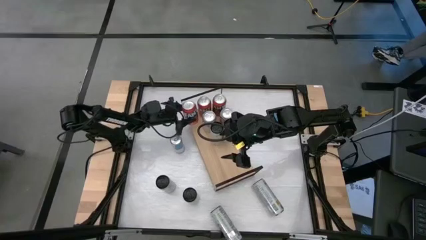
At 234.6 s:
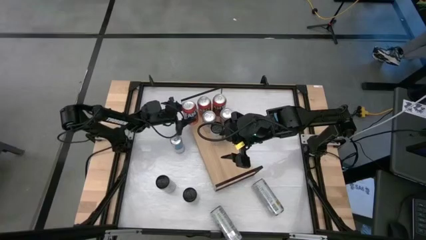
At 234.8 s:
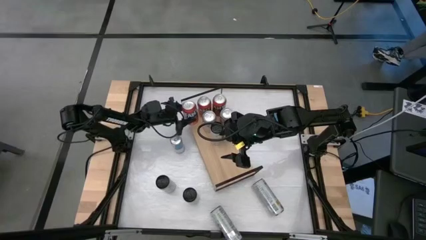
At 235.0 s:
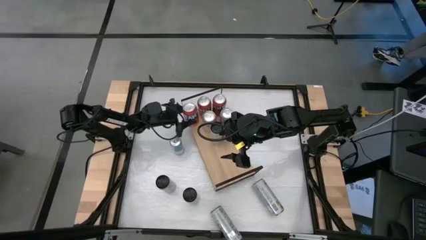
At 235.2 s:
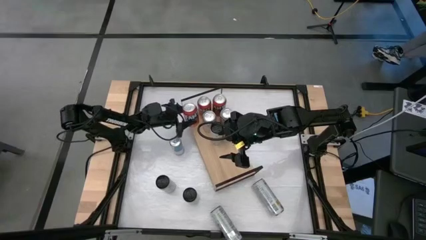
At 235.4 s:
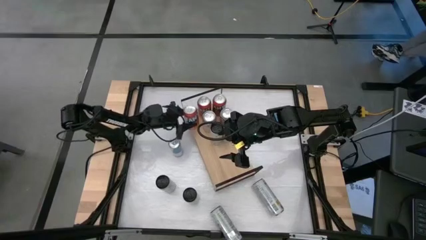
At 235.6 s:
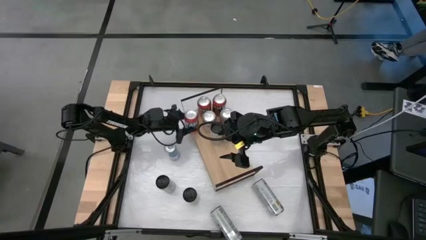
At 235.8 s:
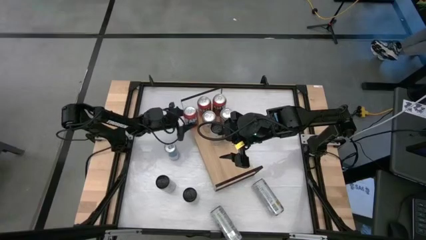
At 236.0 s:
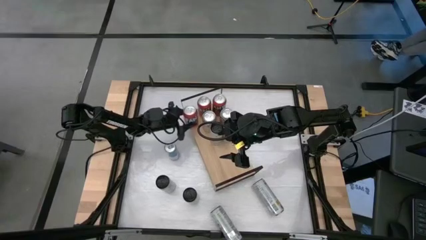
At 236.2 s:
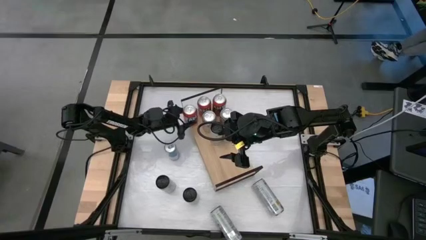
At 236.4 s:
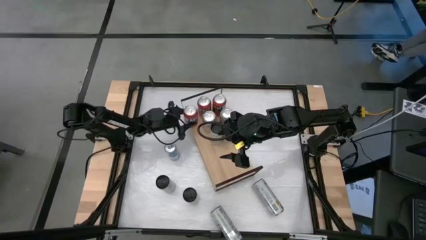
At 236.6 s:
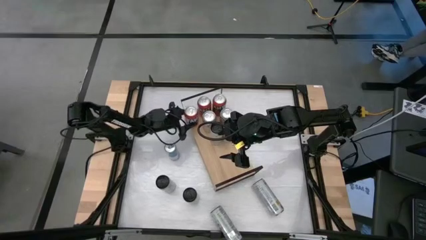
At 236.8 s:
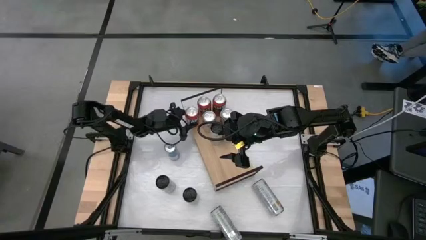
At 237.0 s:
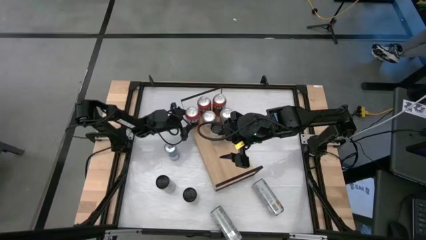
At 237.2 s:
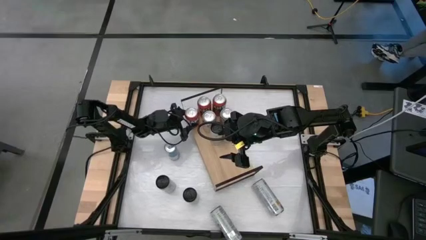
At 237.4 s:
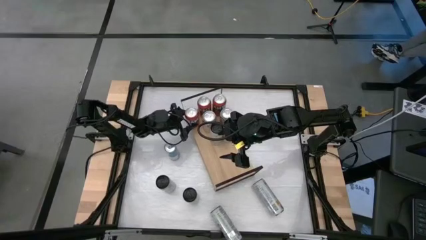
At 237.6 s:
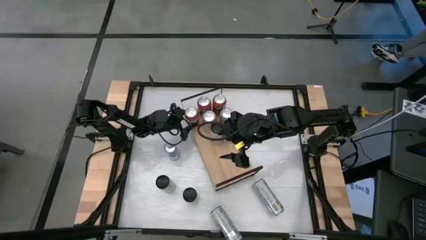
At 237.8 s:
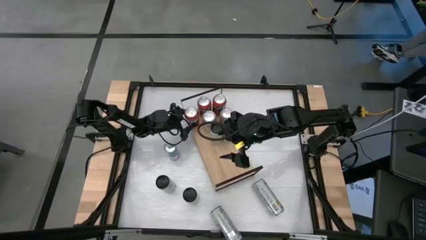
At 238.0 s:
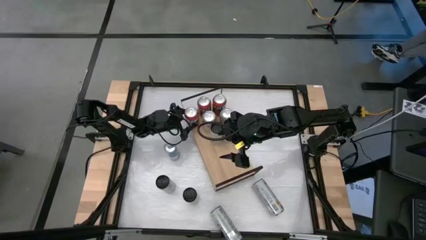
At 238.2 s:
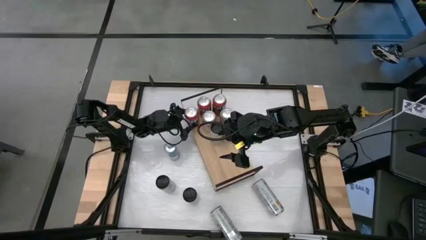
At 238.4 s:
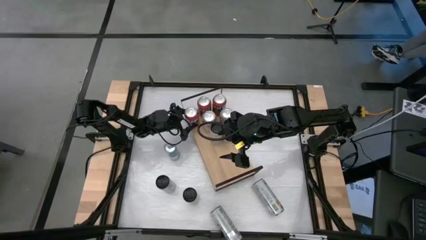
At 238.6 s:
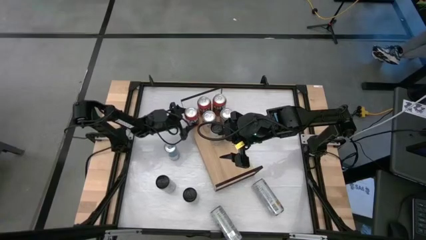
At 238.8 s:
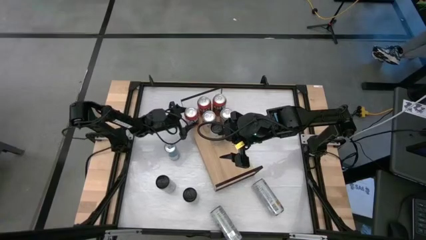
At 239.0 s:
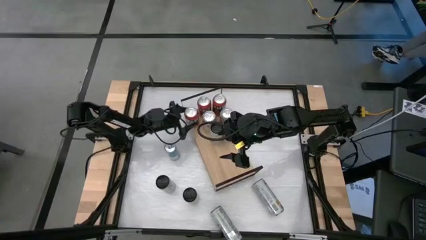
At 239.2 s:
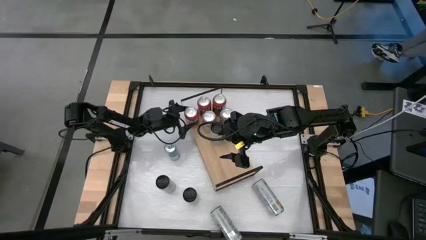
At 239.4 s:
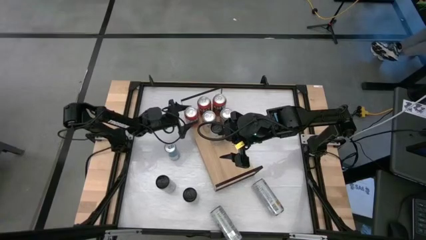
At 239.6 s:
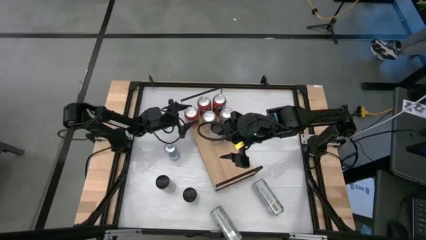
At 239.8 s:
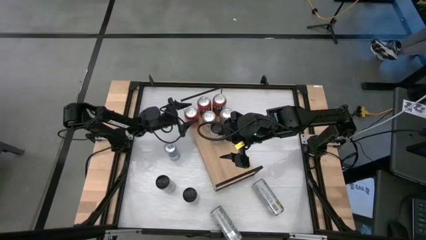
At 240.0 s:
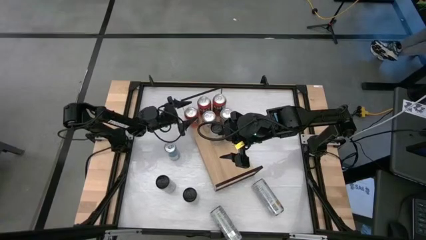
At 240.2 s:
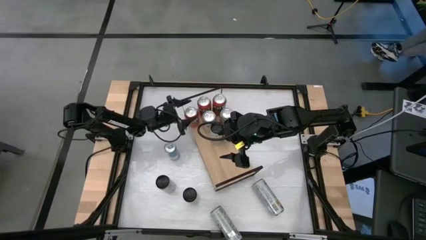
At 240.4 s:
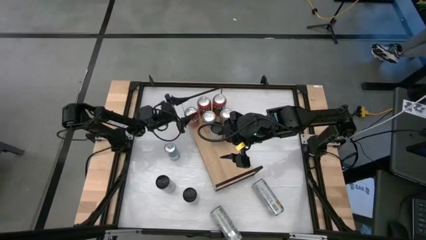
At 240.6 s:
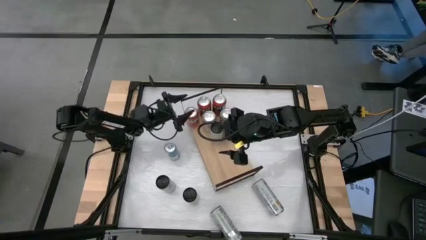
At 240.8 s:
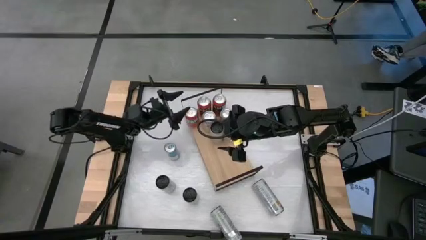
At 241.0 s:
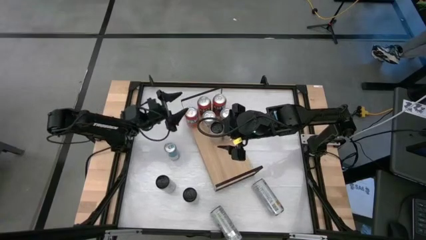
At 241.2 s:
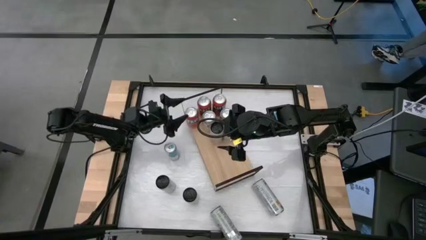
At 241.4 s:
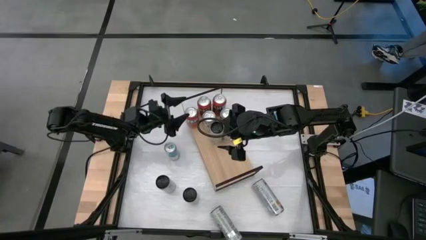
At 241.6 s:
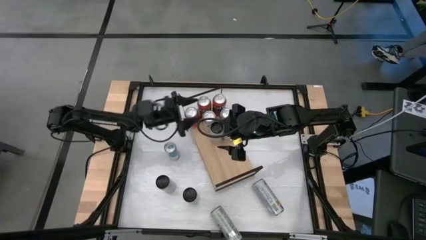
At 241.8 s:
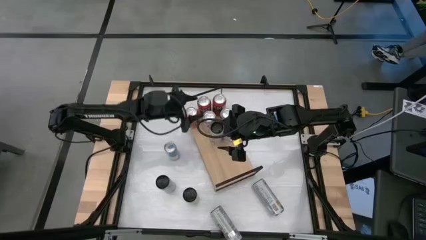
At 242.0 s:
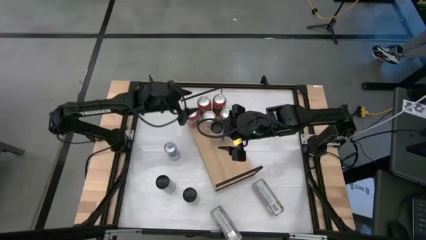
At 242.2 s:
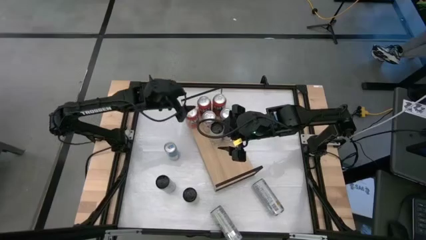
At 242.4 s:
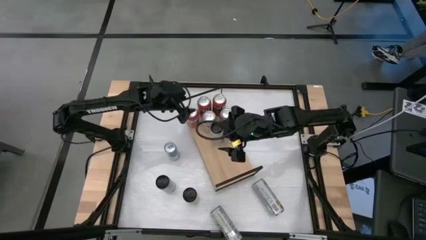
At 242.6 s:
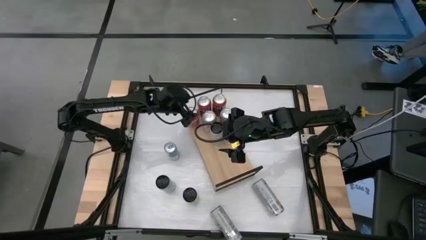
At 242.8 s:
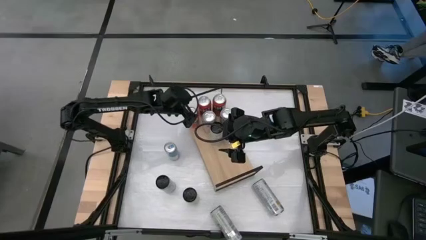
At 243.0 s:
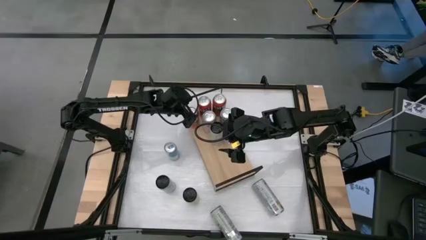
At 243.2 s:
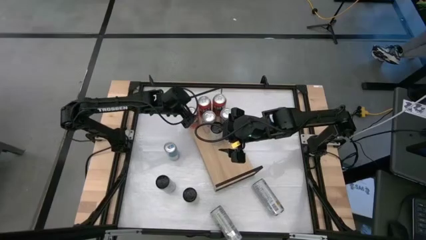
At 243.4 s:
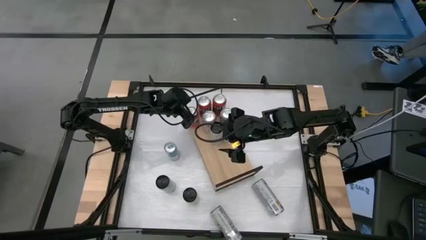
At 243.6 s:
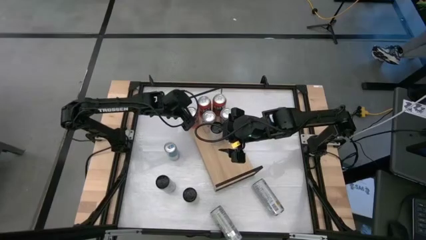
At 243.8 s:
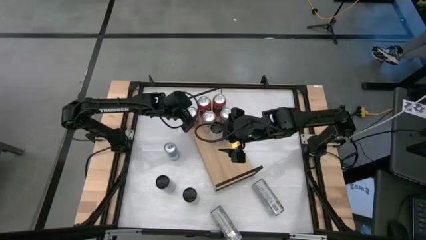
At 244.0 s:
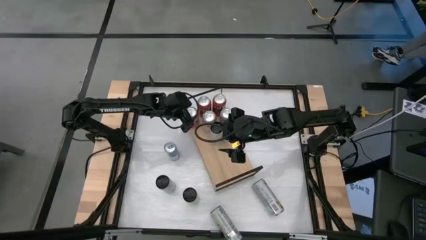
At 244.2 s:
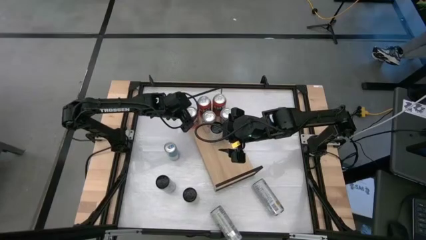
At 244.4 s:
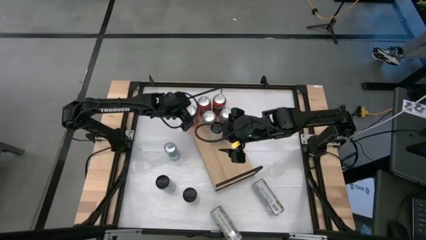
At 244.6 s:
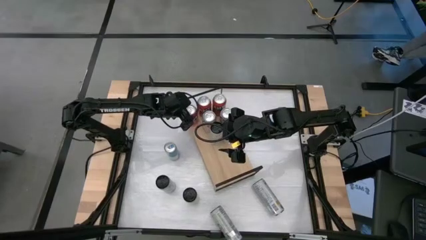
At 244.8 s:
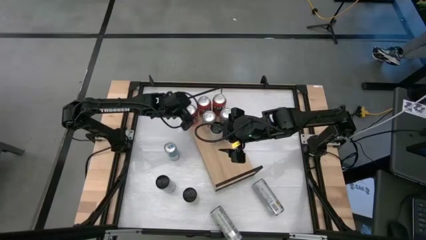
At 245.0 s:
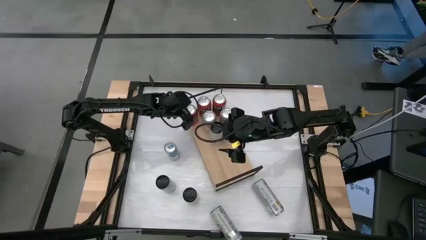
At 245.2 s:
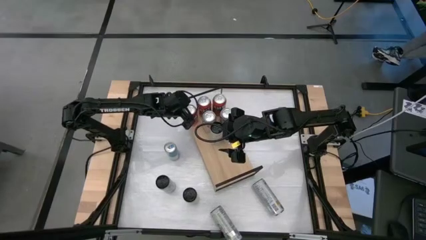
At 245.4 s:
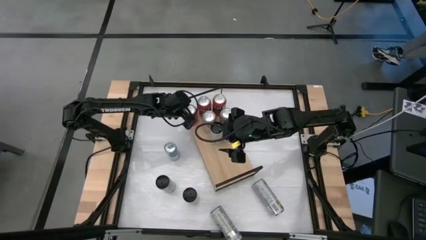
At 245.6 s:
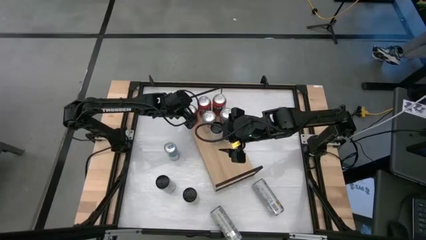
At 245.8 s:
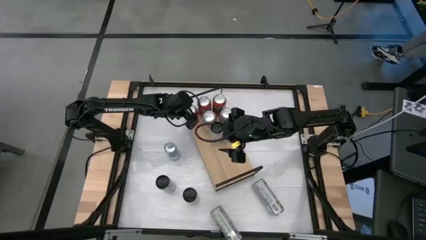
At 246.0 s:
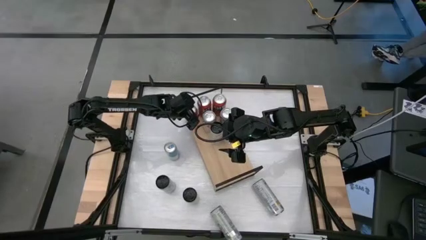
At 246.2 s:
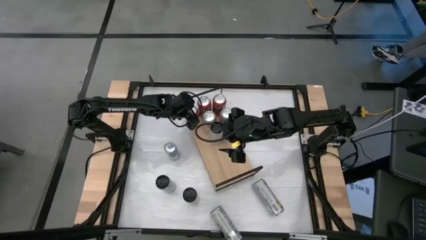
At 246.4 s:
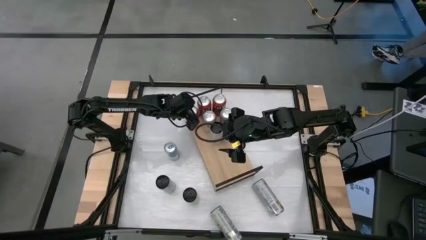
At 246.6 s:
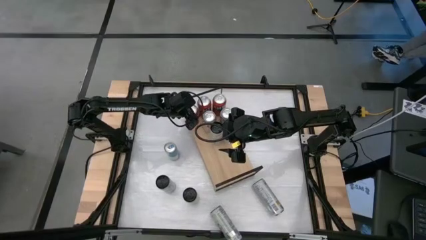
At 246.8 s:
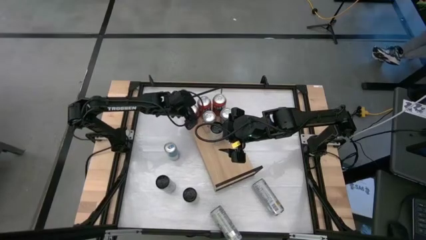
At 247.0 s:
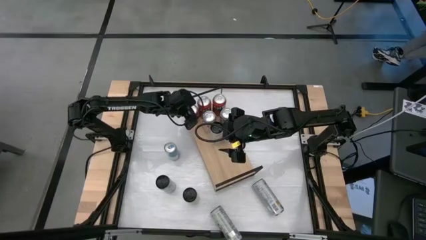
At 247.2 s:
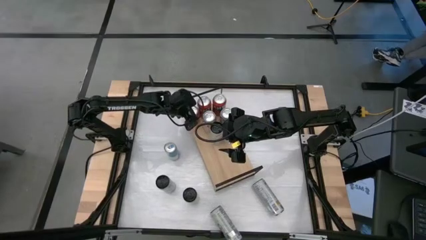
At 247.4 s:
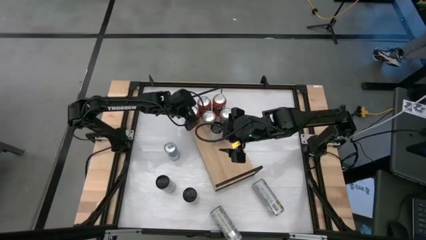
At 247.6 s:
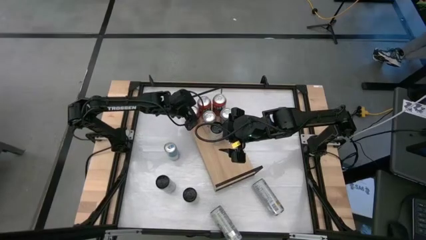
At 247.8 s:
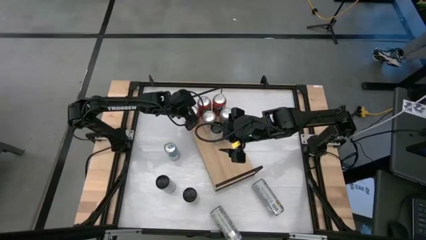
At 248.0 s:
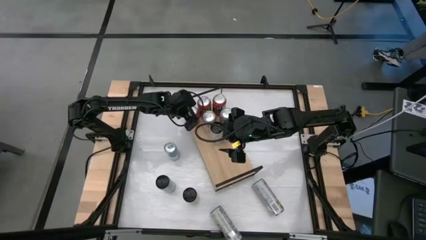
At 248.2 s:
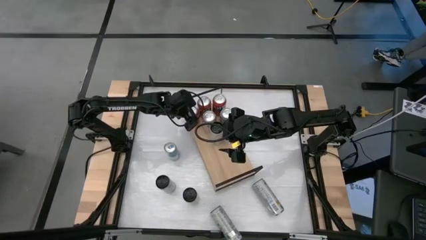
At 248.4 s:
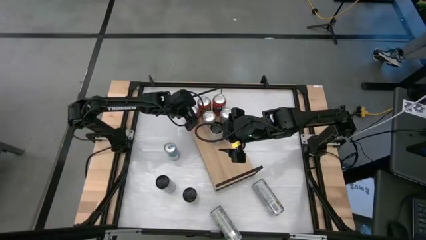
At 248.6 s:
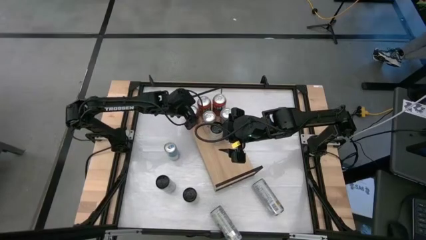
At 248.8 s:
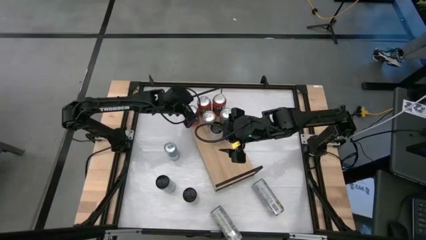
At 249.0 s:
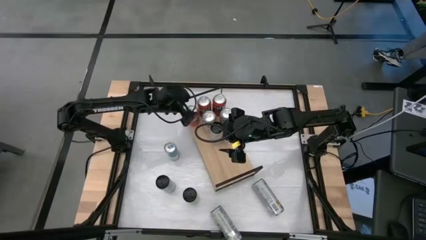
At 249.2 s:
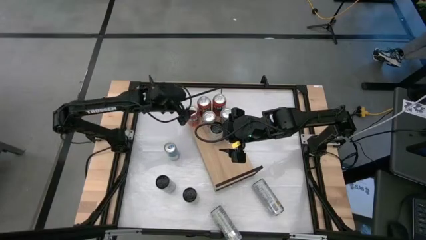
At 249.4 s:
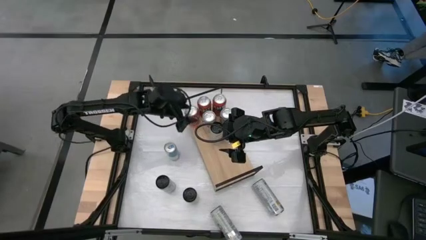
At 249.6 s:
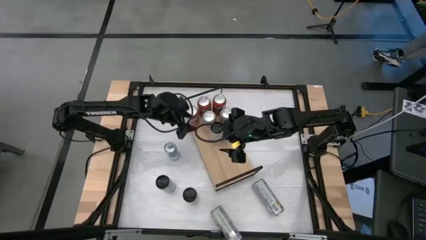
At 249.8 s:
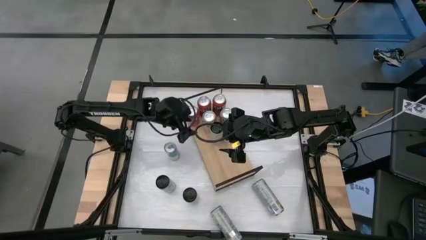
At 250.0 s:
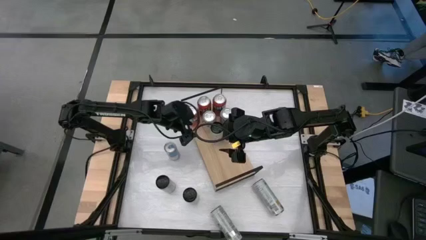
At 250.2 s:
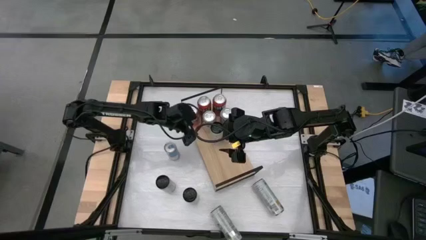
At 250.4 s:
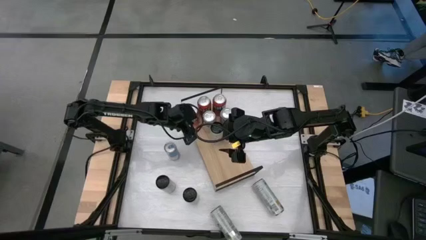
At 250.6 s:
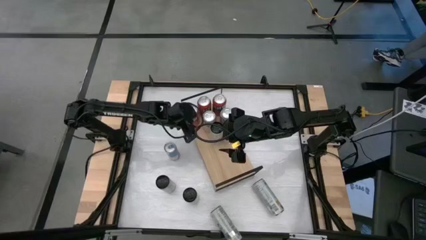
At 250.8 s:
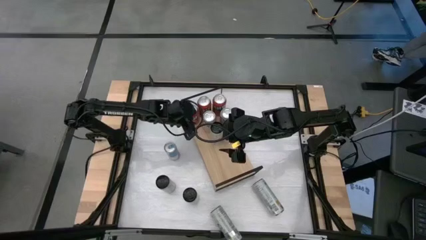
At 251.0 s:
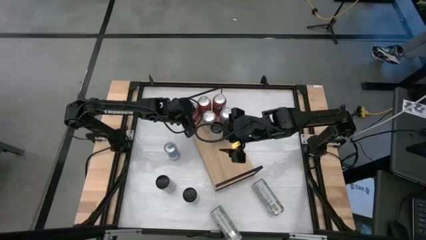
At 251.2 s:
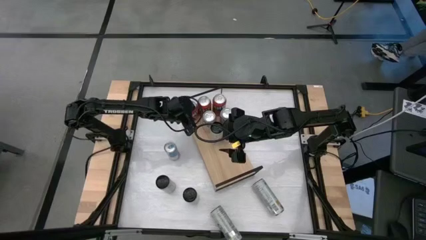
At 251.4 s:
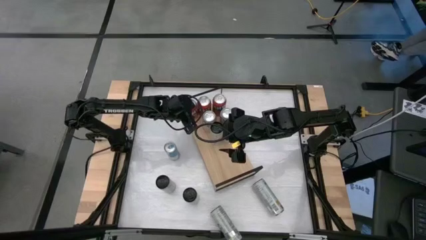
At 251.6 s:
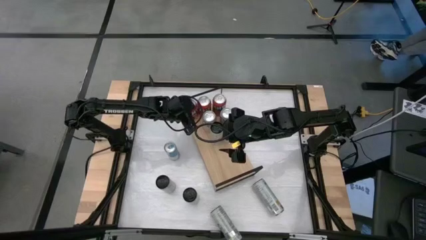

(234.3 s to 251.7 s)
Task: Place canned beverage on shelf
Align the orange soda can with the other orange soda can
